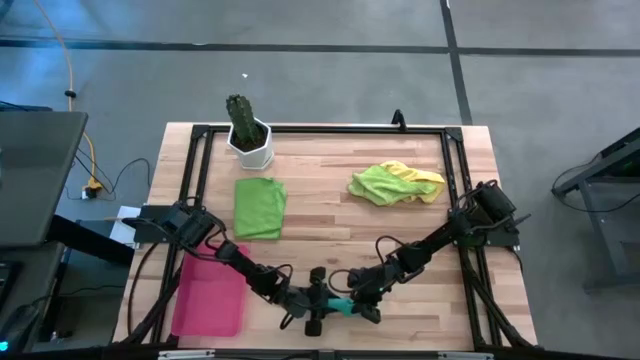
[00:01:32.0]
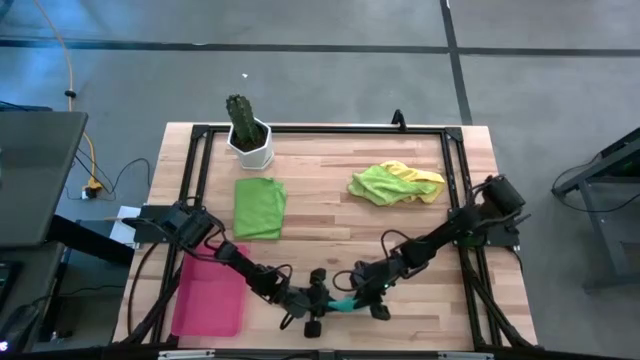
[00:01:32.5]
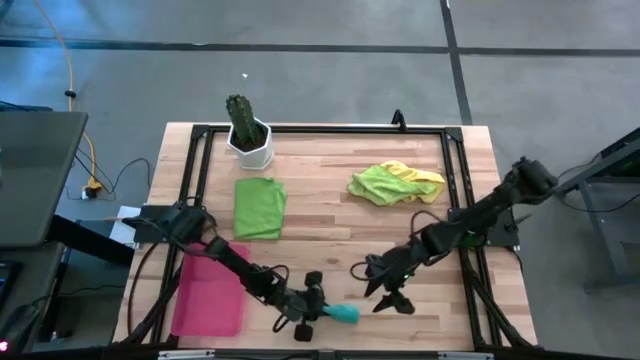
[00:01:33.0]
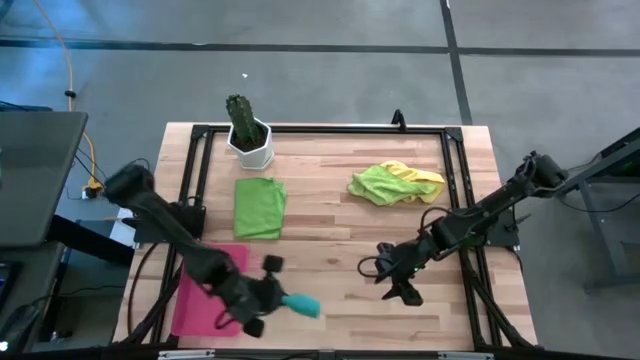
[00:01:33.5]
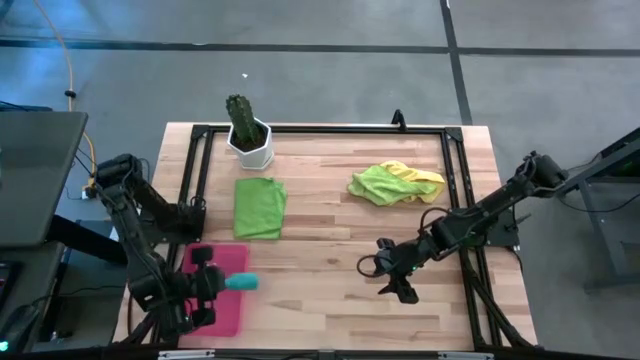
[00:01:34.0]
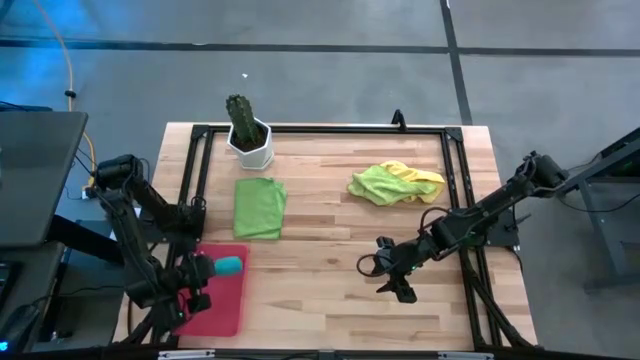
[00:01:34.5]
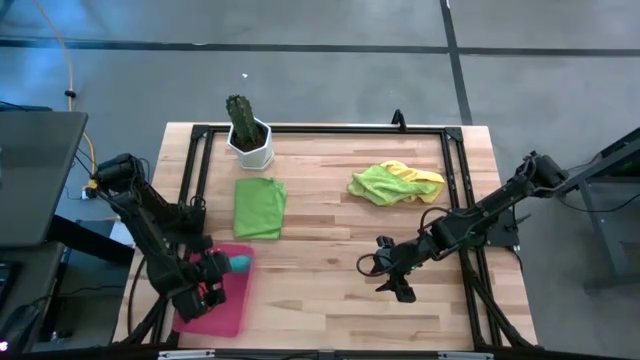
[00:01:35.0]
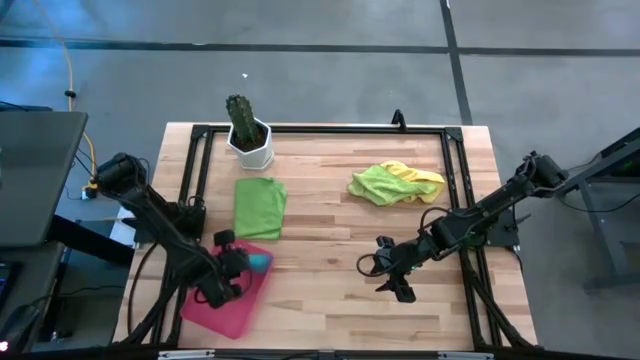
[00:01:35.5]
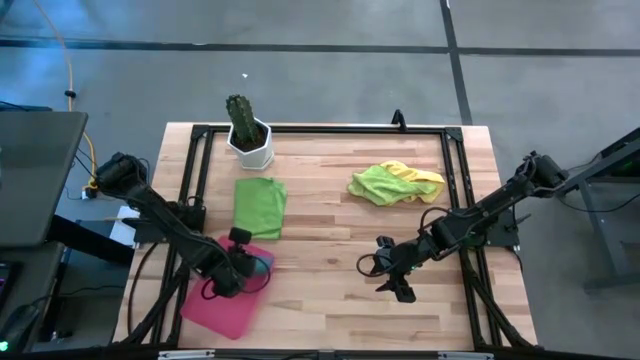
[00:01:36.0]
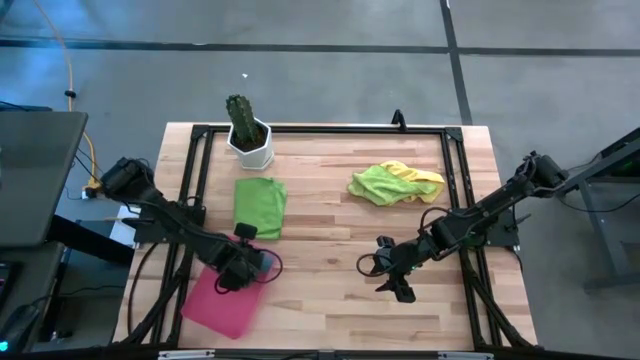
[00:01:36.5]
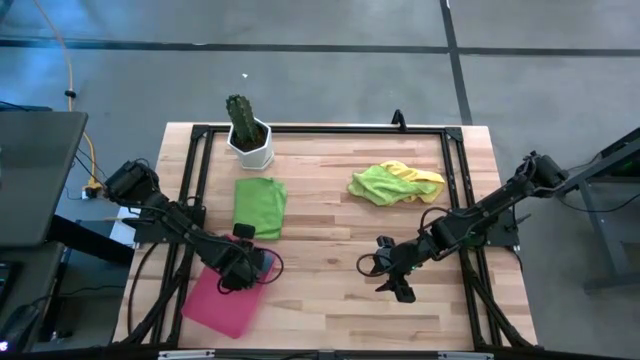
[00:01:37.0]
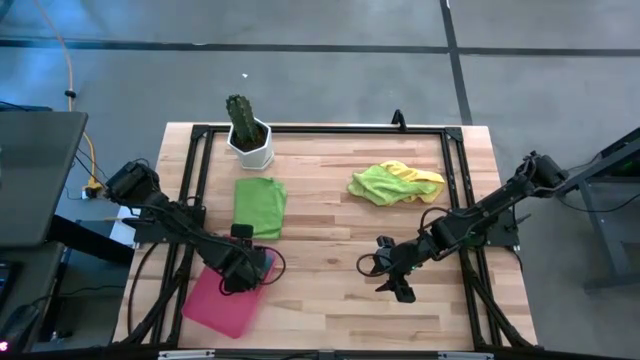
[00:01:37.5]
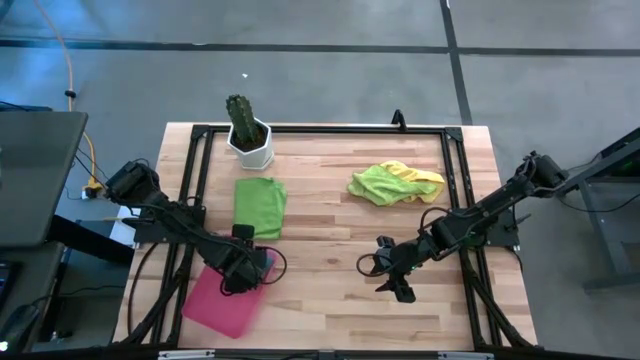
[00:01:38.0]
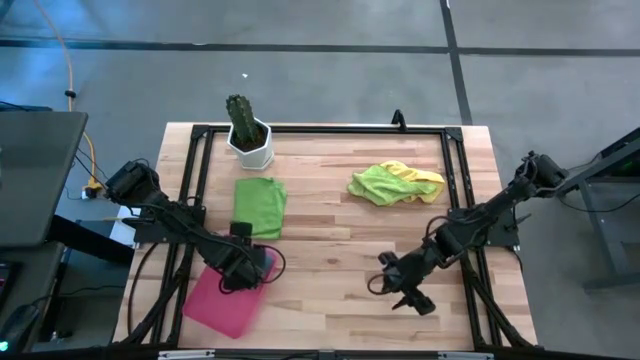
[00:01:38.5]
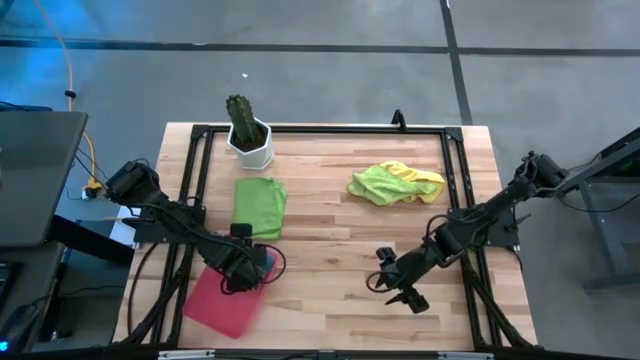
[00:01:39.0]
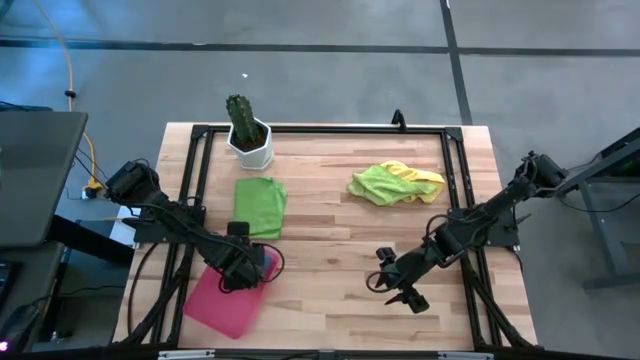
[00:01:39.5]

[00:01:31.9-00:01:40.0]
Task: Roll microfiber towels into tight, uniform cylinder then place into a basket
Put the rolled blue towel into the red bin

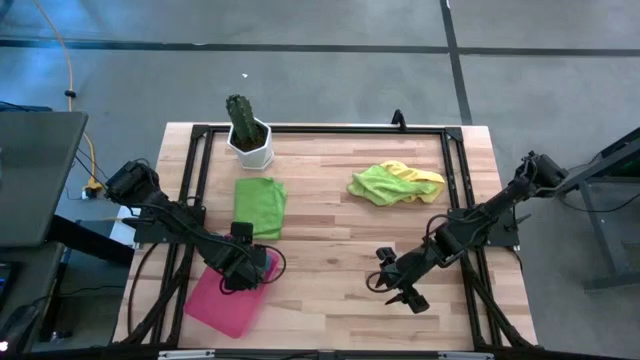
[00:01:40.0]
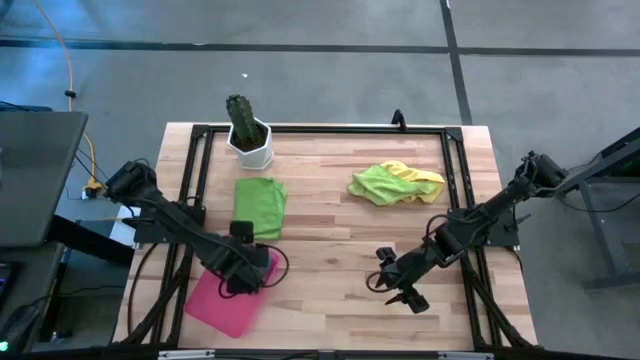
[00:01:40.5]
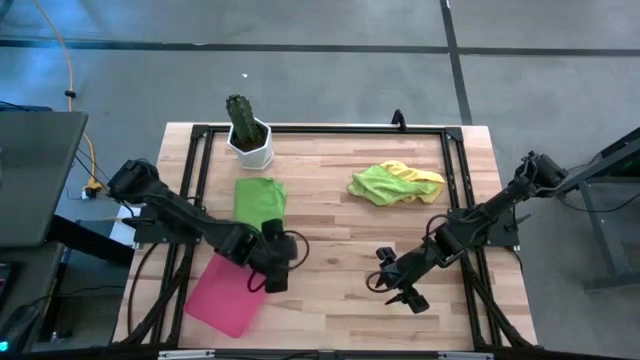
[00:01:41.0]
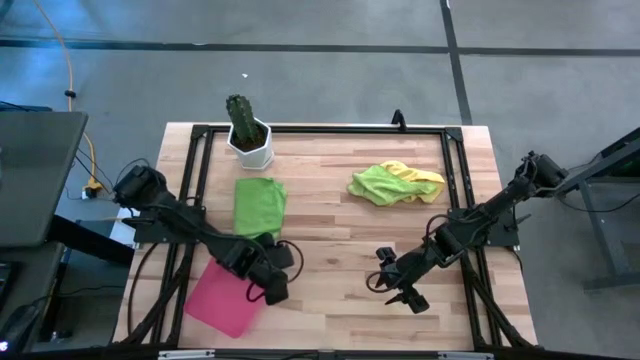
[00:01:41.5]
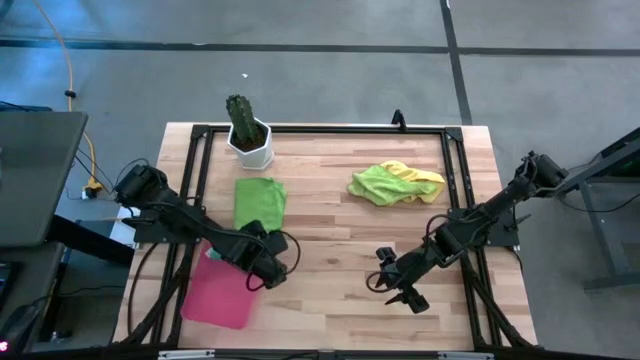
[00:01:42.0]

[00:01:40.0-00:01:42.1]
Adjust the bin
